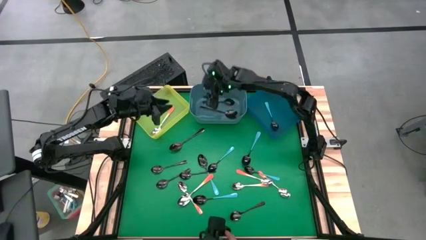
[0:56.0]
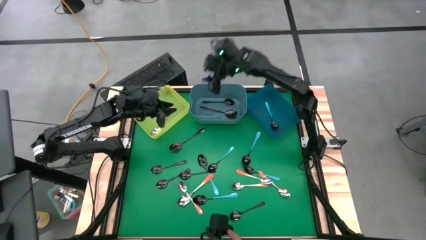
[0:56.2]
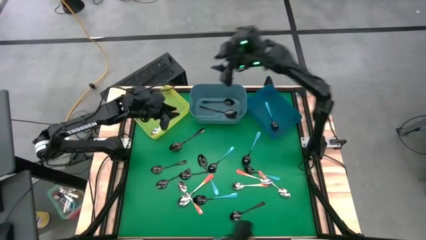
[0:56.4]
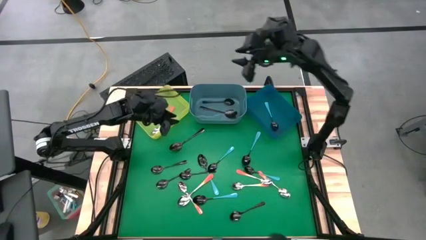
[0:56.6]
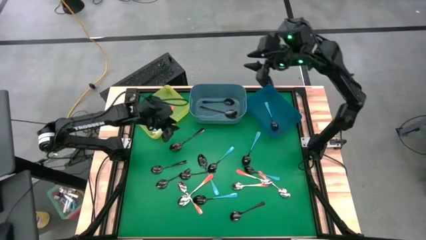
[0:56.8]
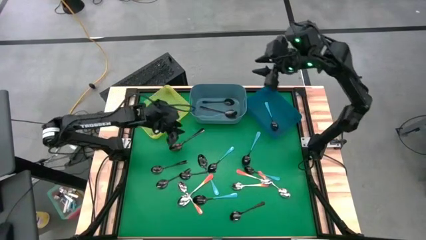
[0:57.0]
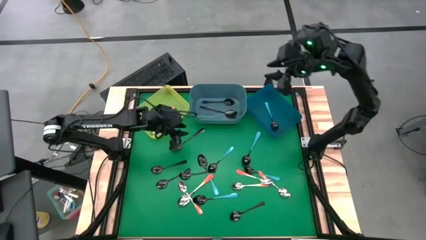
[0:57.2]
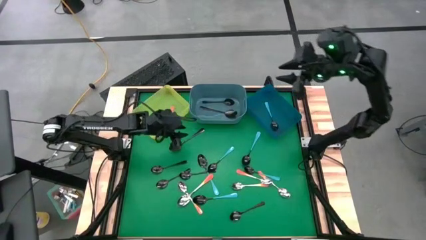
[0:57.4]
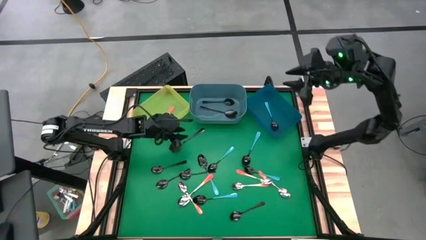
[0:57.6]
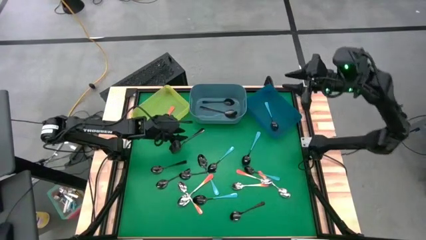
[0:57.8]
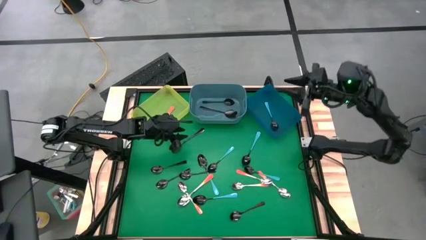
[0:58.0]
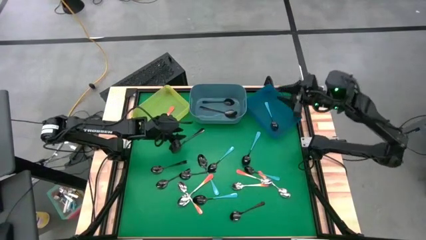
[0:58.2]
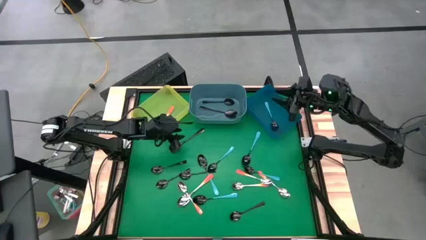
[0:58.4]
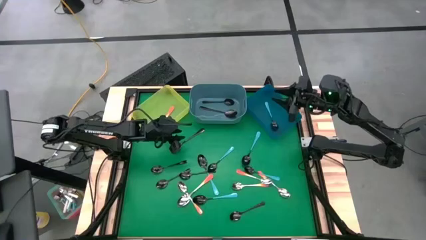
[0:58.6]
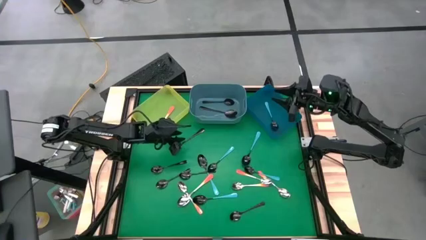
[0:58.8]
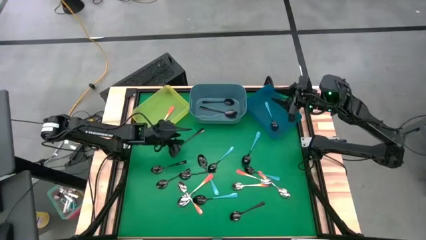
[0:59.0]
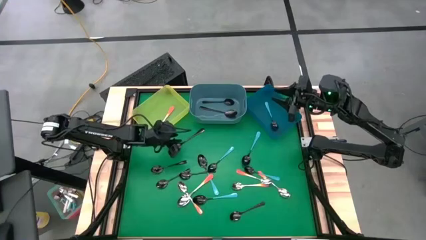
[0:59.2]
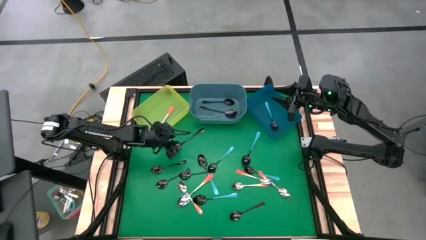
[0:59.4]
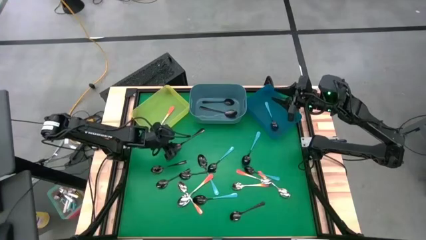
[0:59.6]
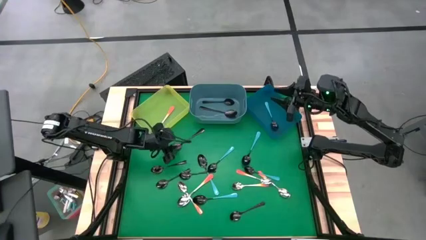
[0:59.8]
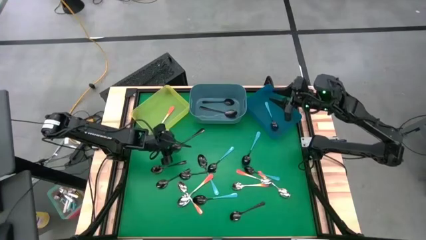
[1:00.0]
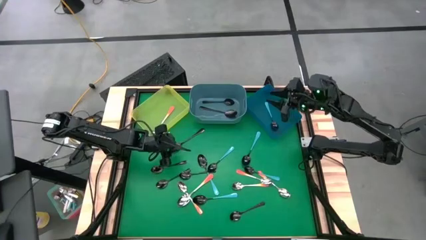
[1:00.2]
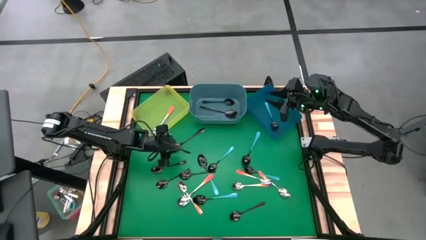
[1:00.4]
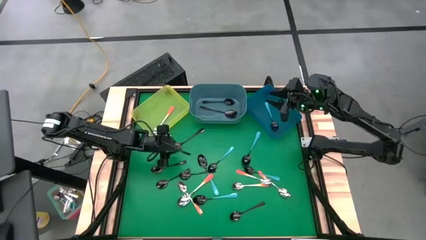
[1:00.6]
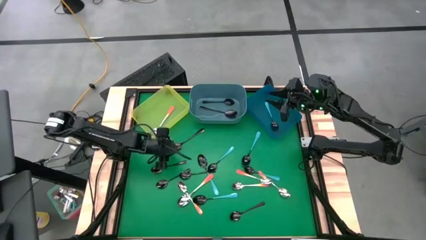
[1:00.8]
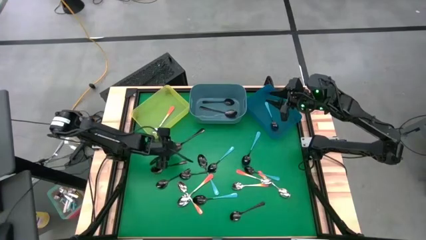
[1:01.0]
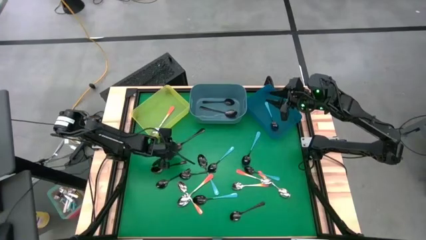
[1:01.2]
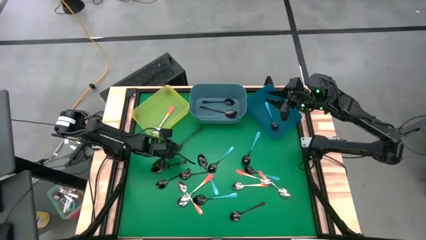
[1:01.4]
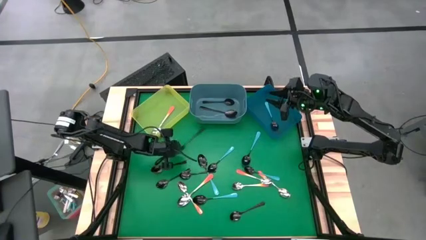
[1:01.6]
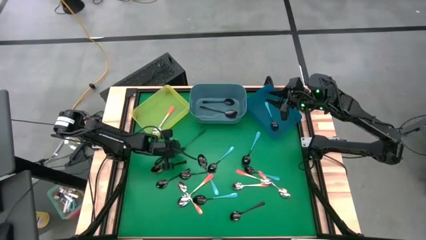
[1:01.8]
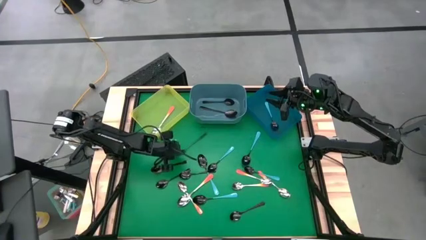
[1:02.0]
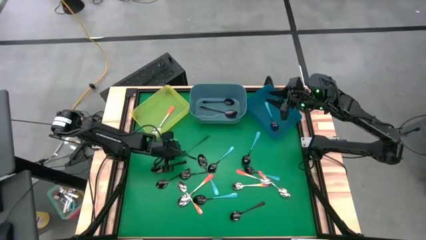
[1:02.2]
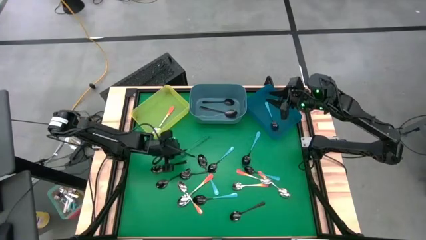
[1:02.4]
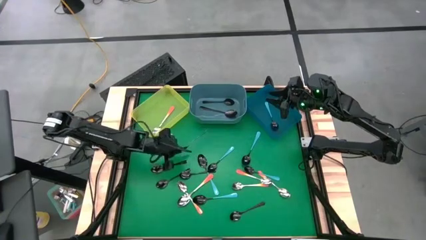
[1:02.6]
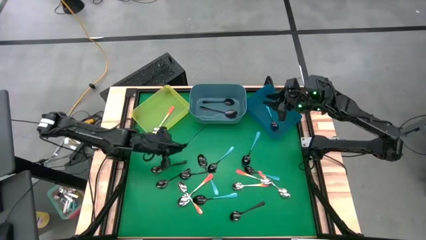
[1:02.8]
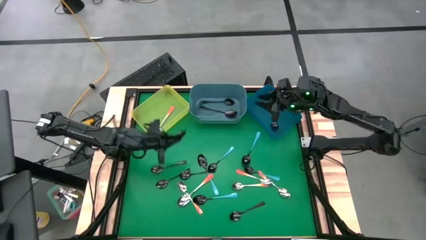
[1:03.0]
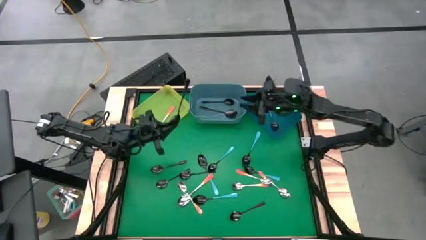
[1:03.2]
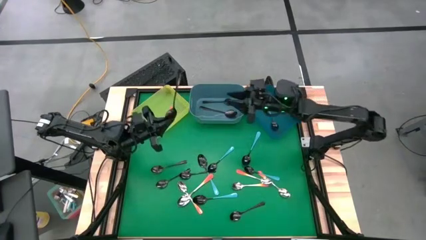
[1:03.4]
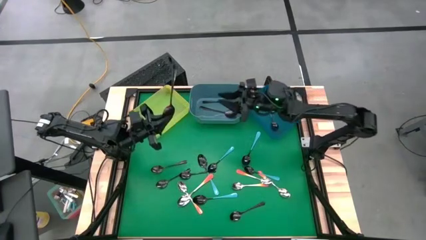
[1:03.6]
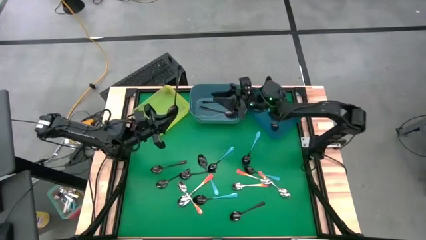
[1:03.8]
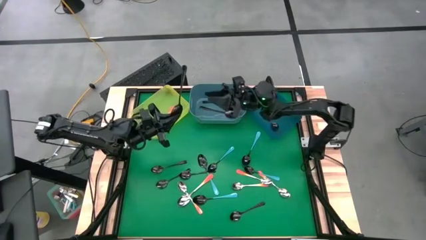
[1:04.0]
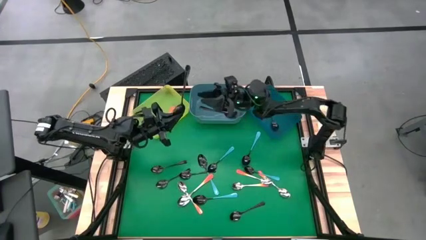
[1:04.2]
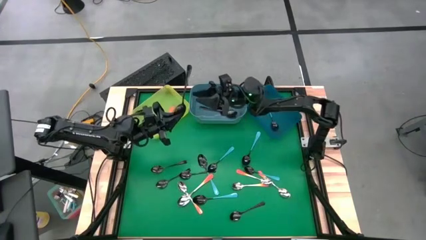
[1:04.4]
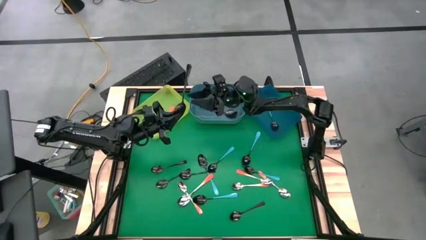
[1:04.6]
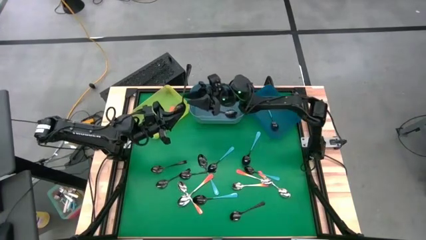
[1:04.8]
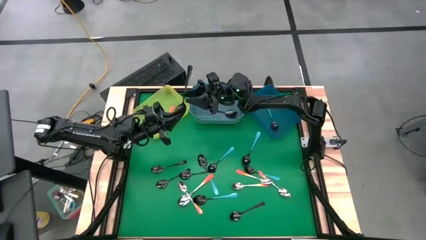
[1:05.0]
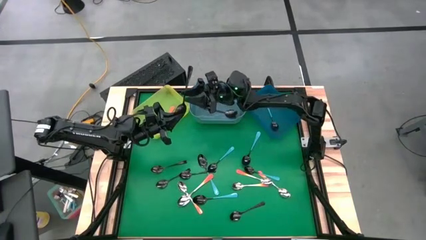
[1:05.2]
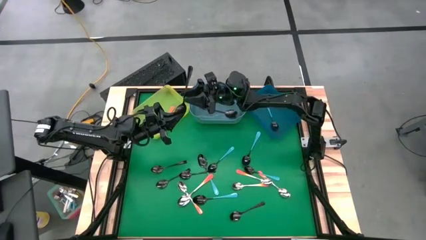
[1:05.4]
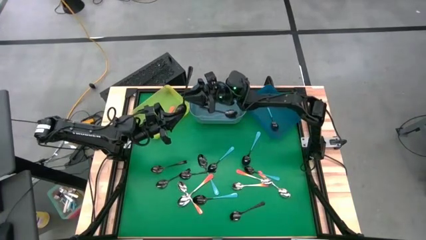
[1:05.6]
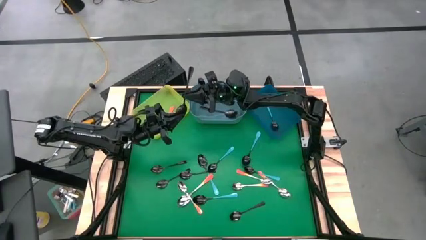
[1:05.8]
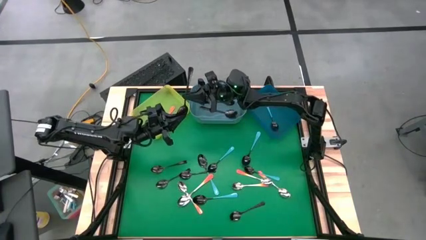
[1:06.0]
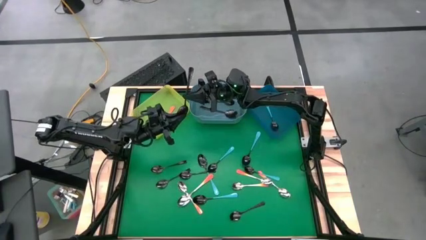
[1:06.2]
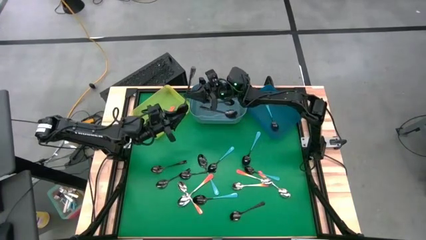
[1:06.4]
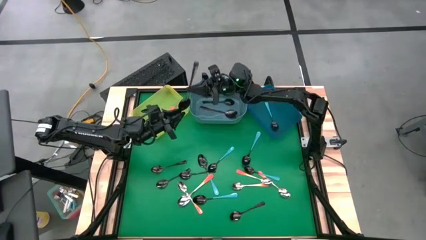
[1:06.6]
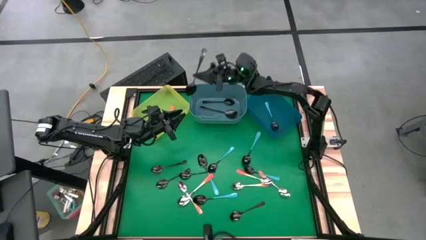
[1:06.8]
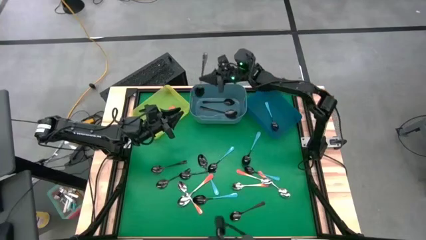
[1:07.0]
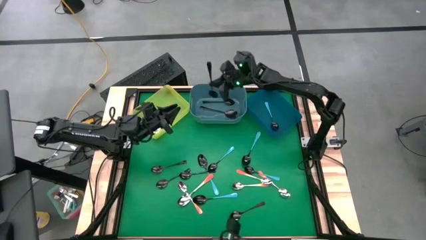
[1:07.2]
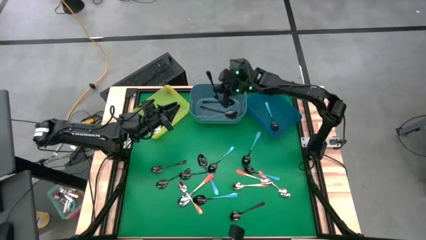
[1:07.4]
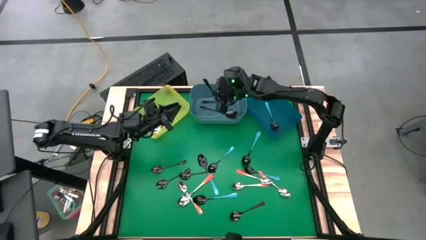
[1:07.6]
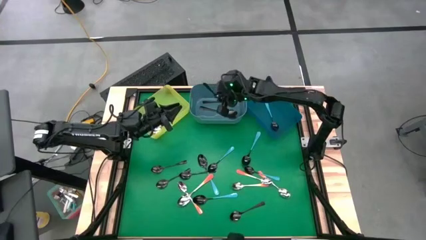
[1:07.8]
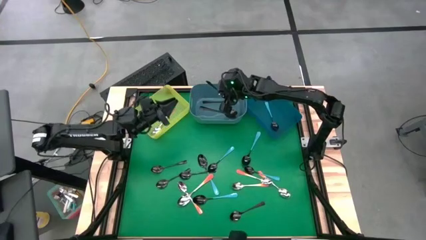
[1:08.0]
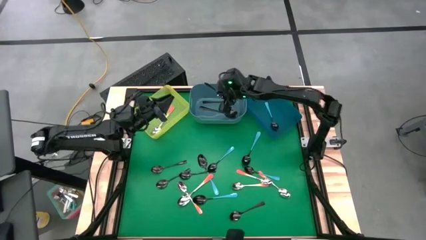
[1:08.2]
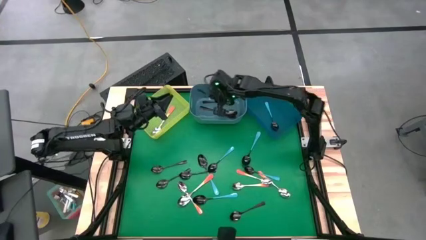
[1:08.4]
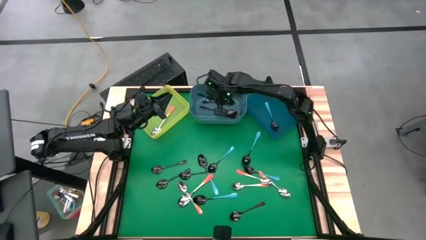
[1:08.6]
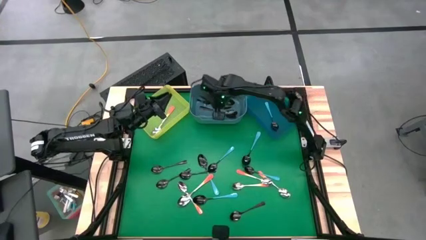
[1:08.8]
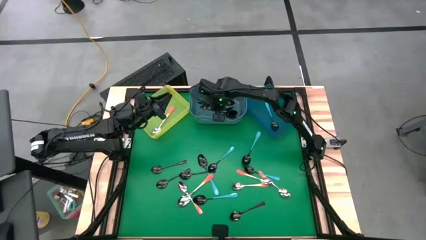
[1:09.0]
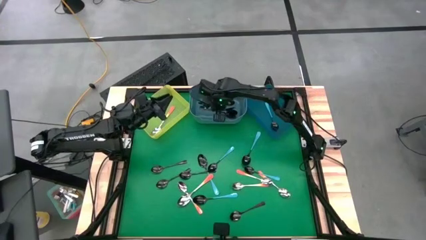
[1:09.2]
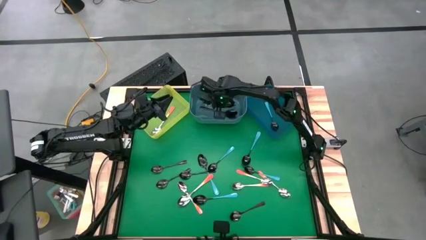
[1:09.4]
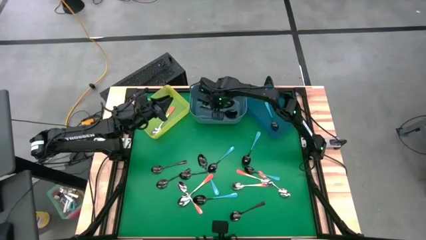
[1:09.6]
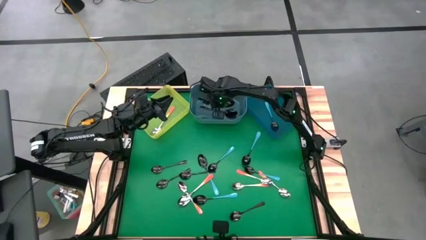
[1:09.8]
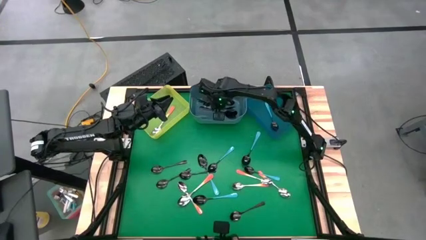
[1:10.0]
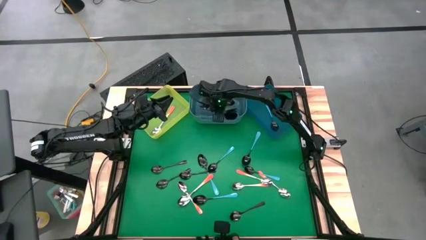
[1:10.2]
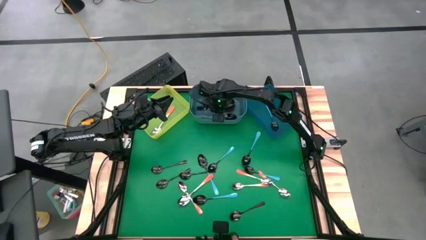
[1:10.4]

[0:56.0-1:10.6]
Task: Sort silverware by color (type)
Put the black spoon into the light blue bin
